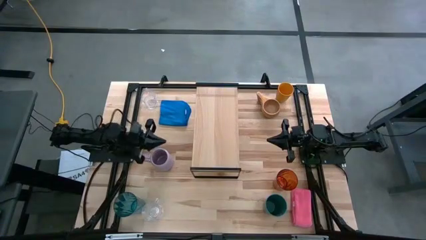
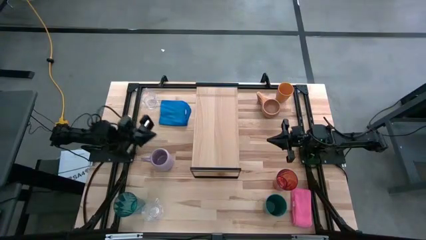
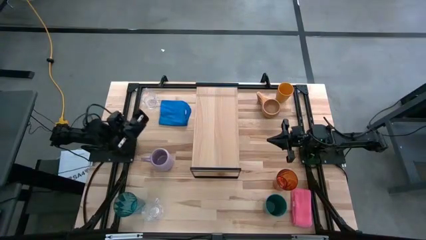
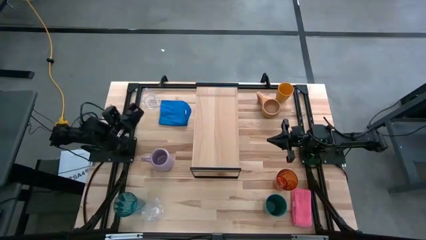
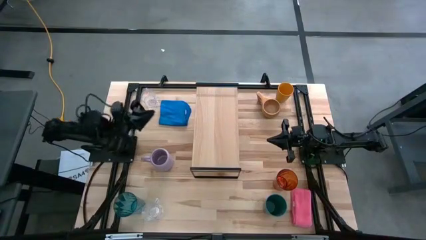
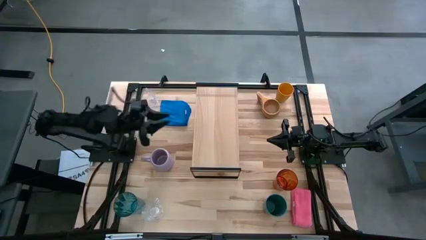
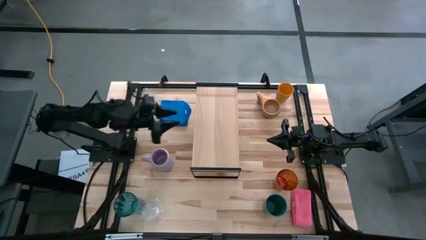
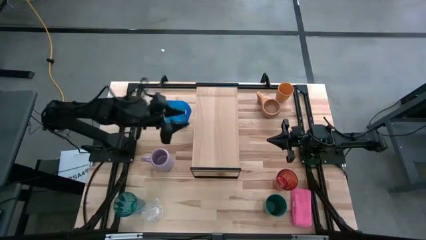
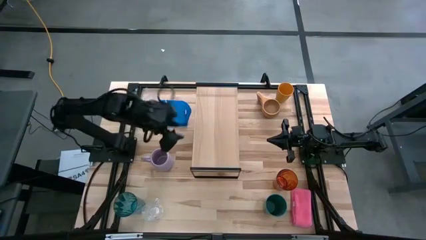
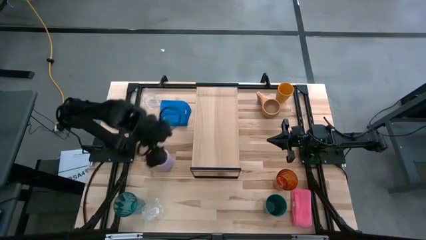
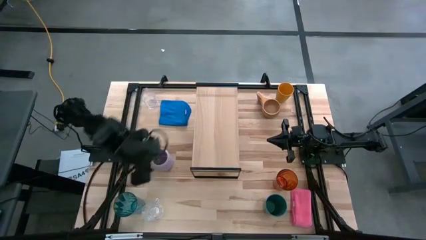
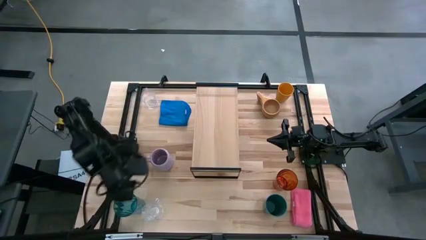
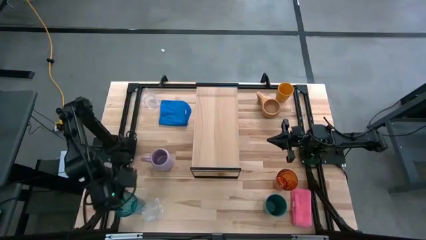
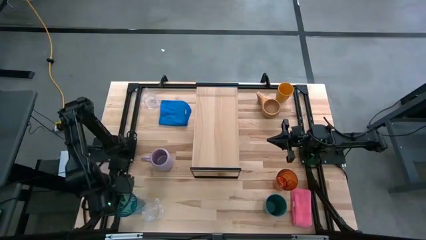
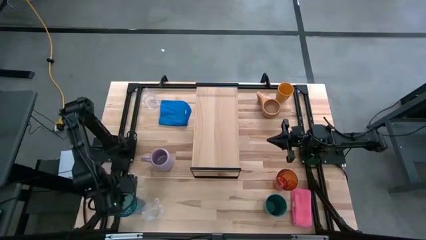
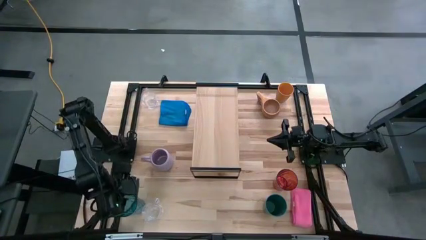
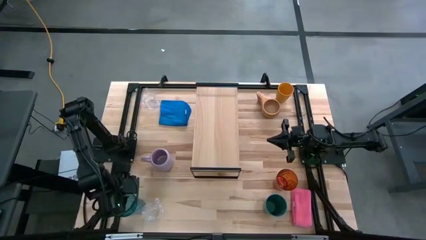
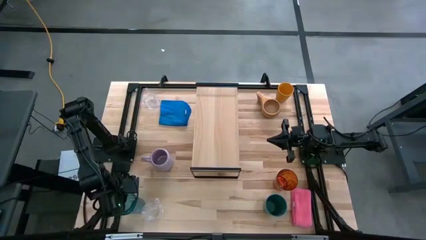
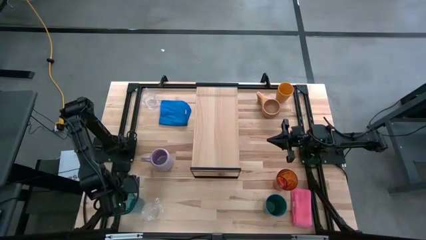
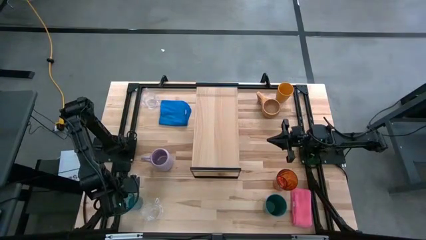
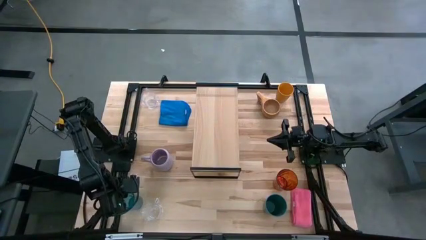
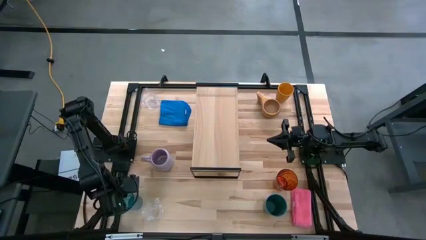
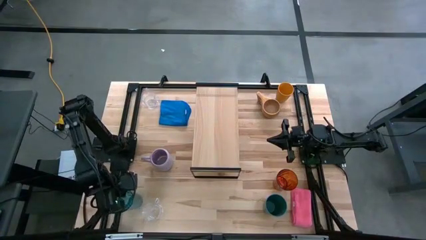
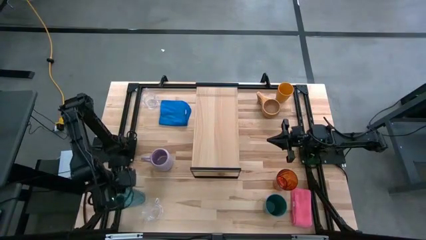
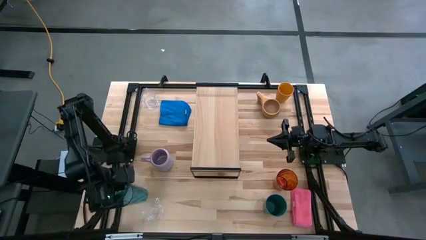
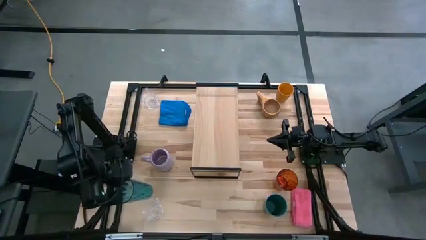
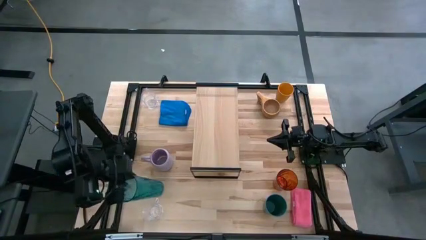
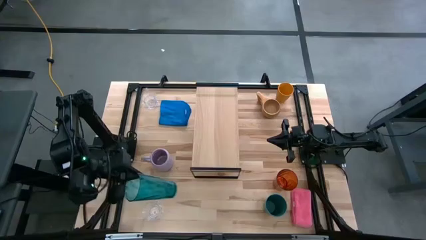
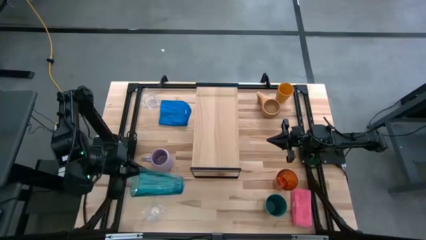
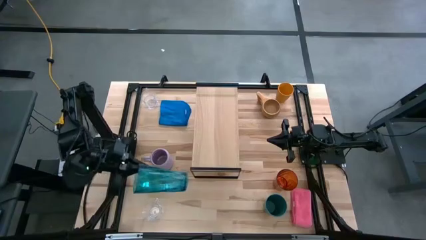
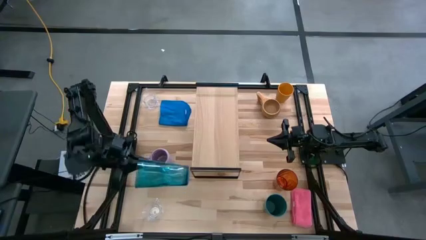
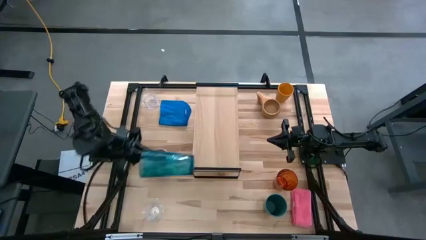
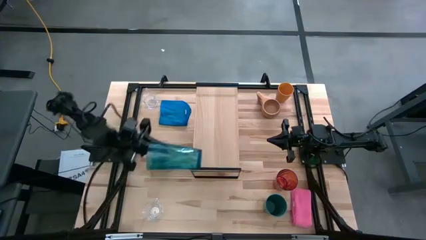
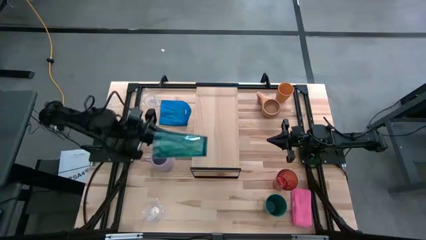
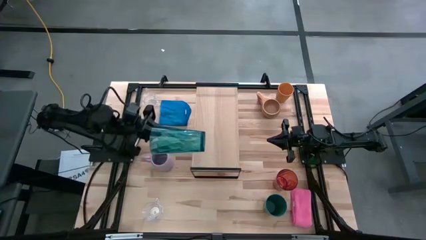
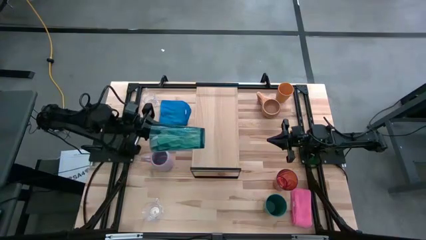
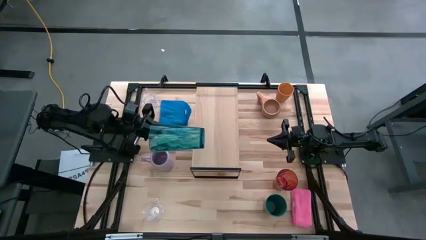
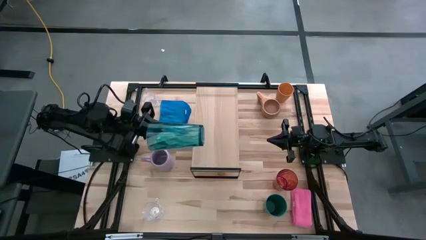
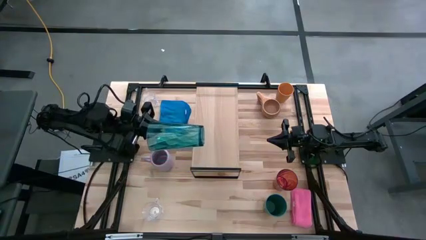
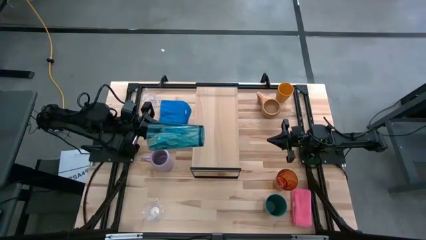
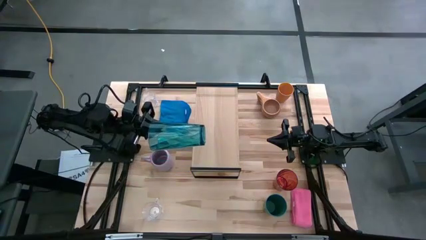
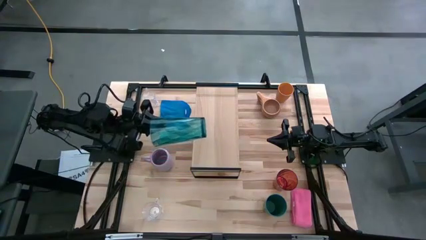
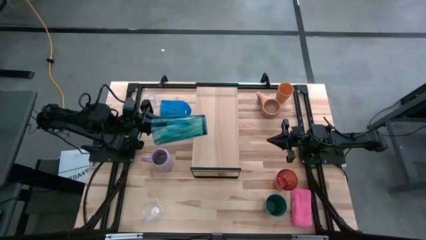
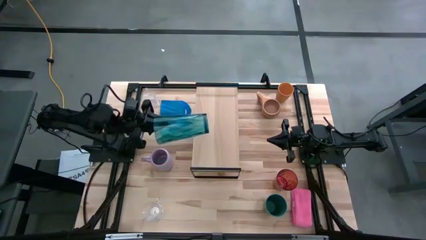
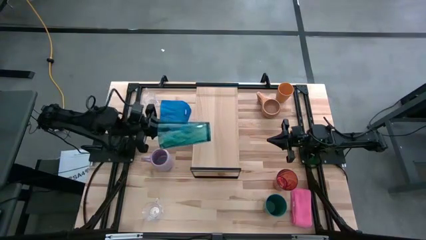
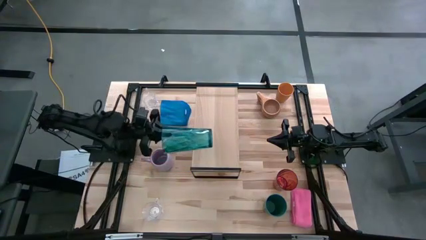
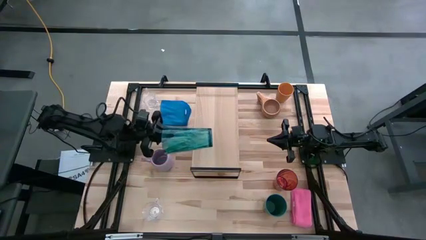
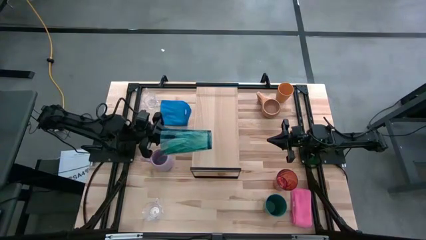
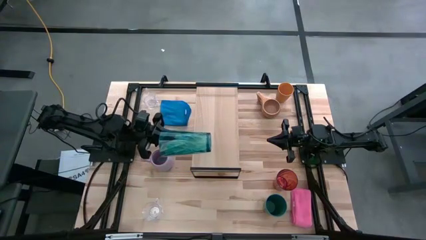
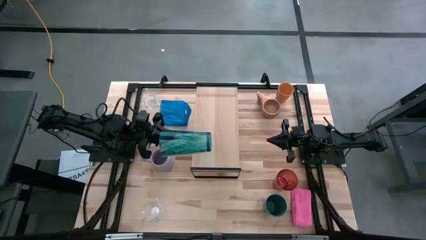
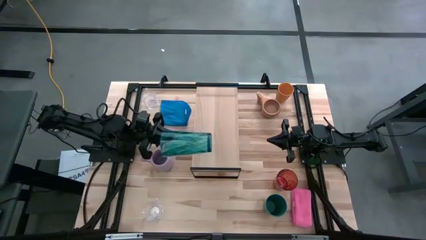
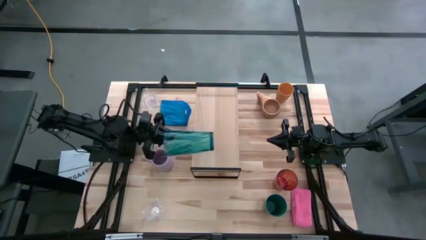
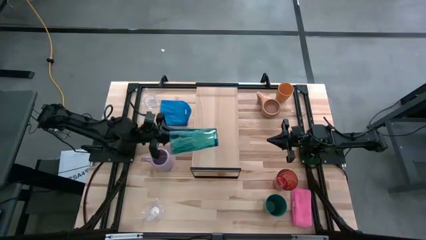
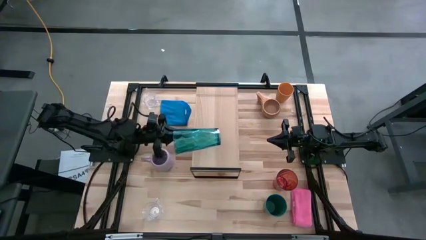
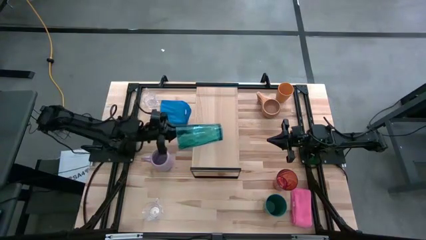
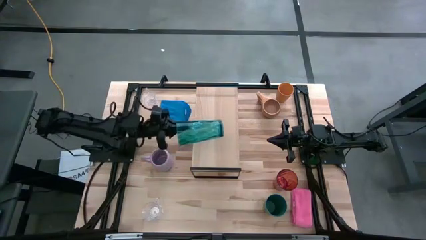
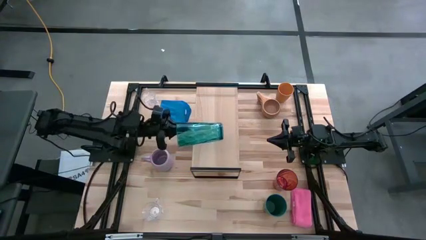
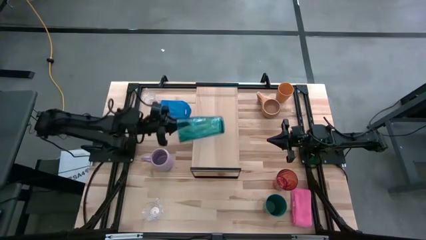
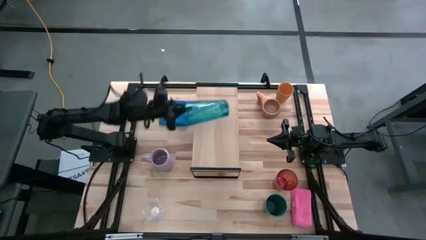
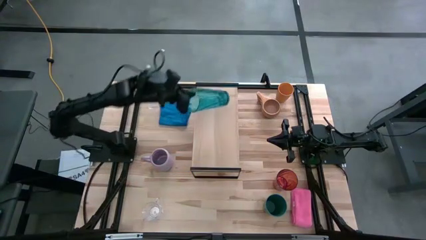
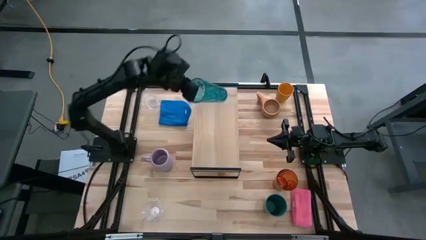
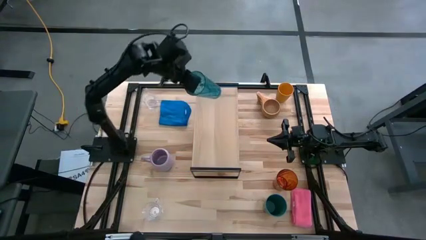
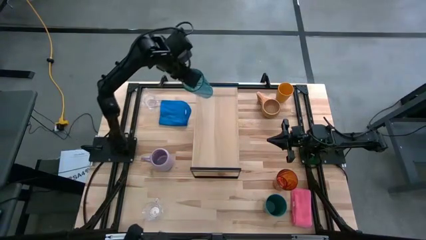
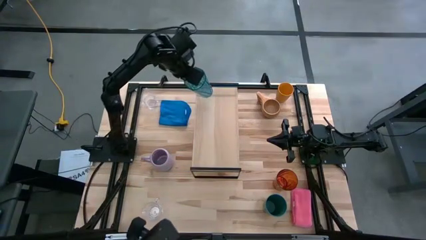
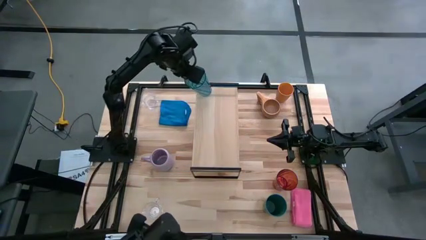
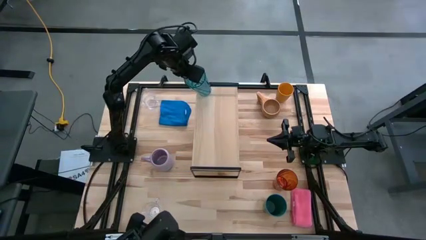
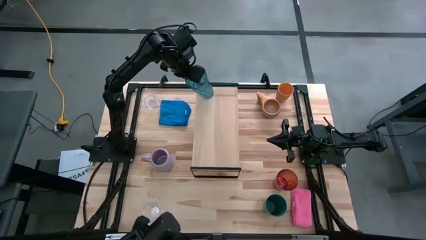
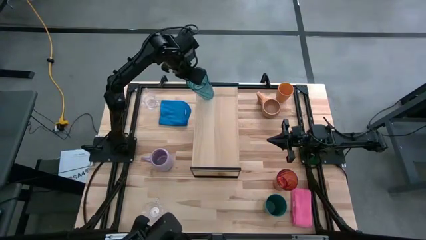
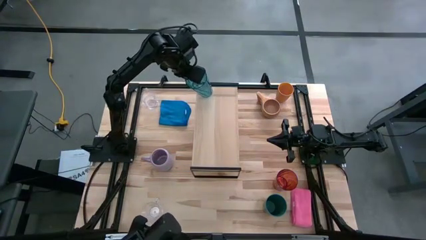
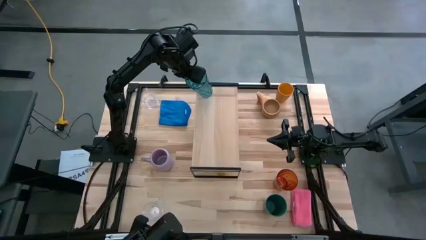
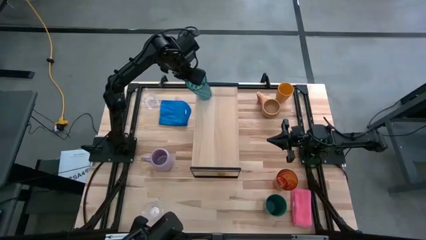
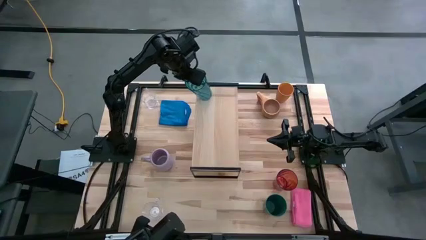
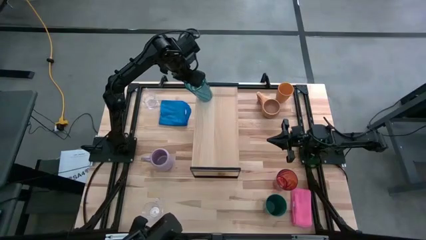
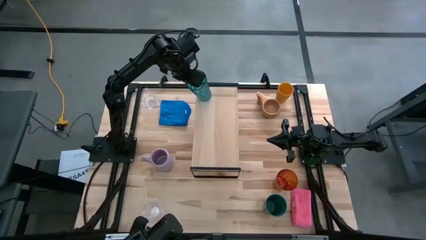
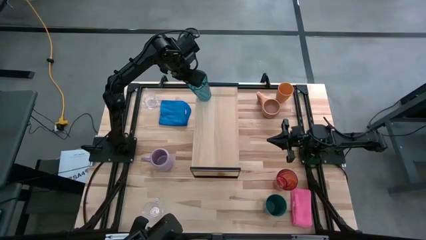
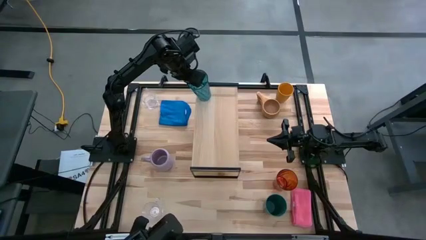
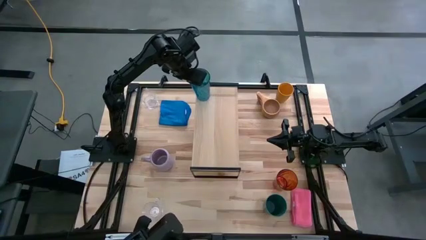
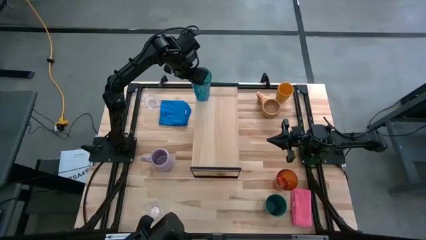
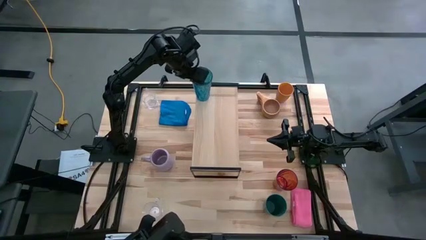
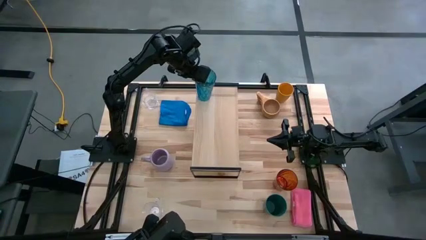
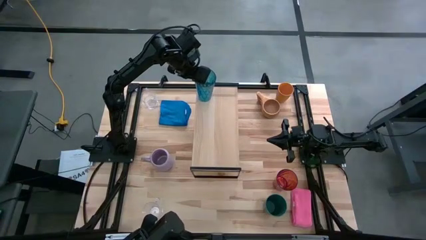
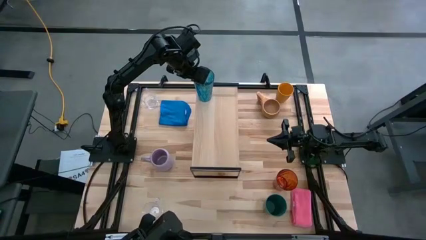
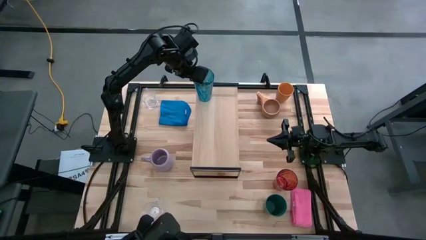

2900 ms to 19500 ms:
Task: Stack small to large cups/mugs on shelf
Put the blue cup on the shelf
